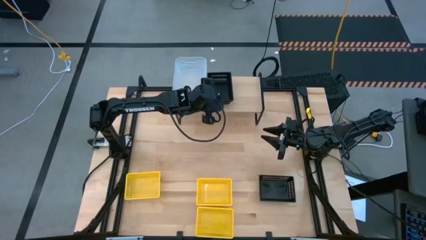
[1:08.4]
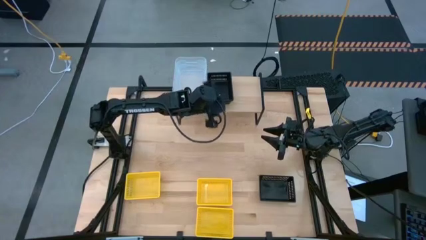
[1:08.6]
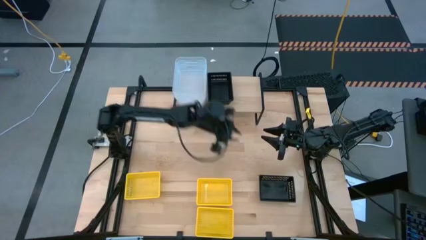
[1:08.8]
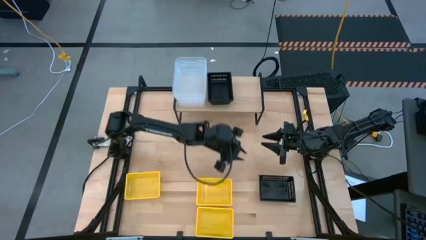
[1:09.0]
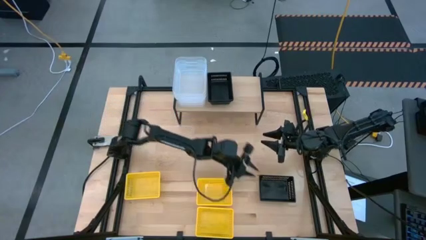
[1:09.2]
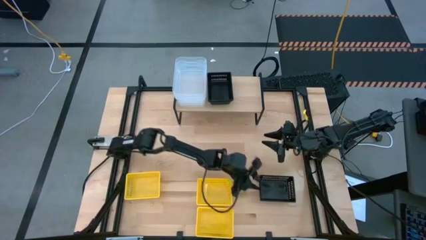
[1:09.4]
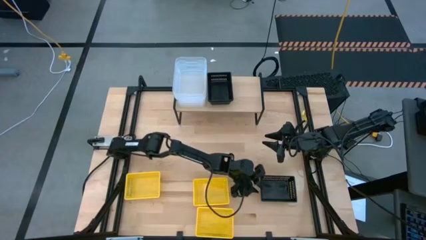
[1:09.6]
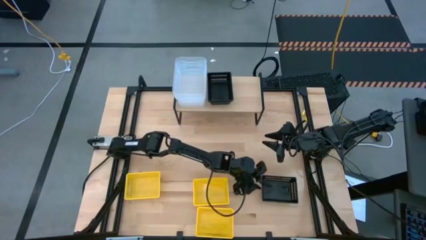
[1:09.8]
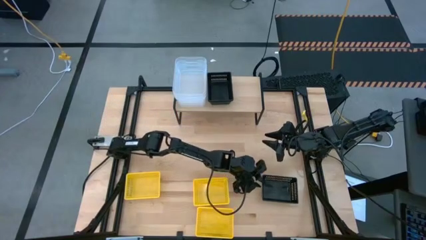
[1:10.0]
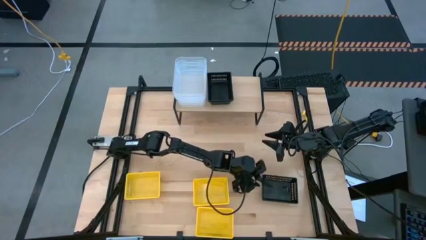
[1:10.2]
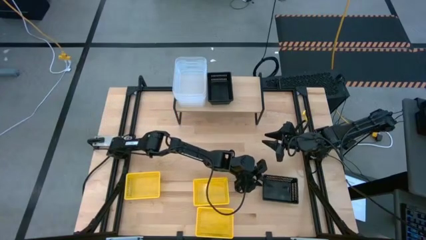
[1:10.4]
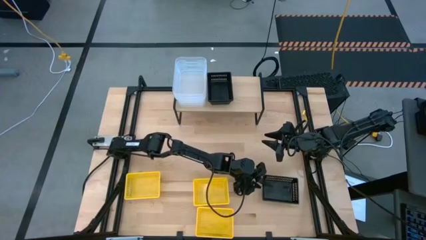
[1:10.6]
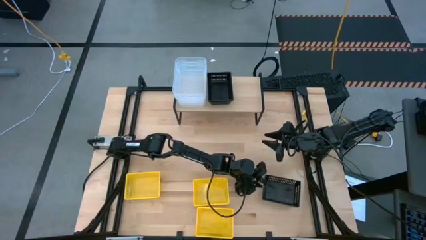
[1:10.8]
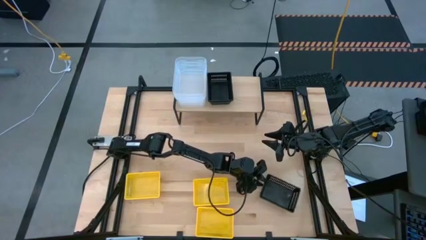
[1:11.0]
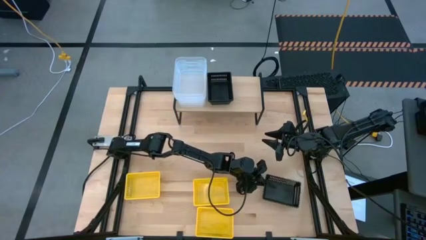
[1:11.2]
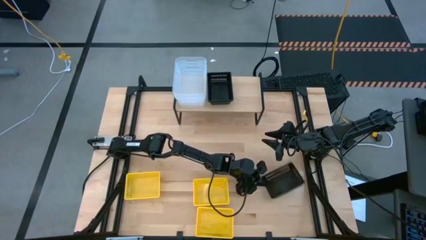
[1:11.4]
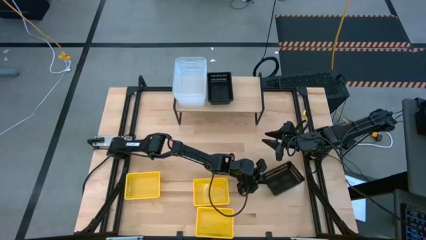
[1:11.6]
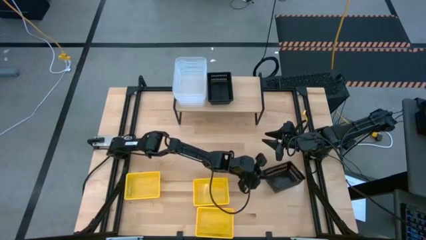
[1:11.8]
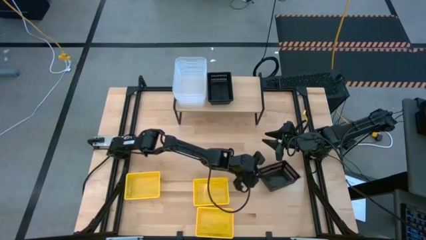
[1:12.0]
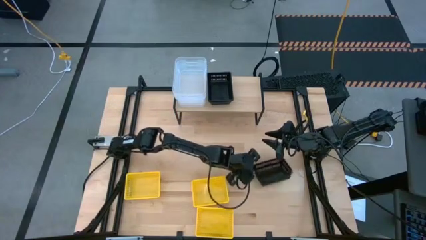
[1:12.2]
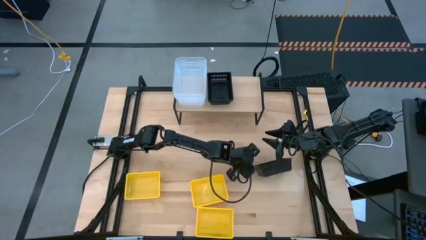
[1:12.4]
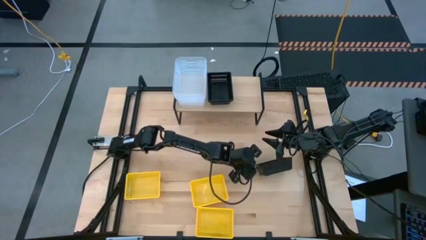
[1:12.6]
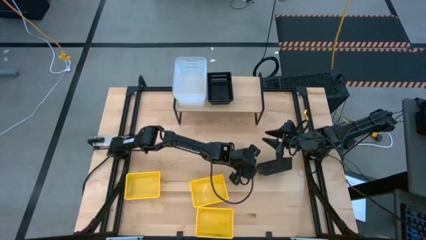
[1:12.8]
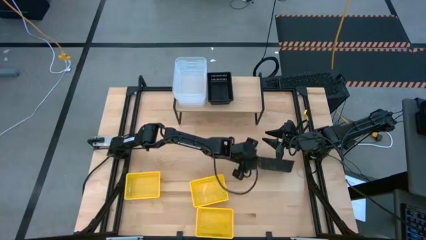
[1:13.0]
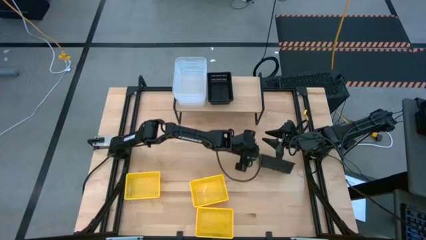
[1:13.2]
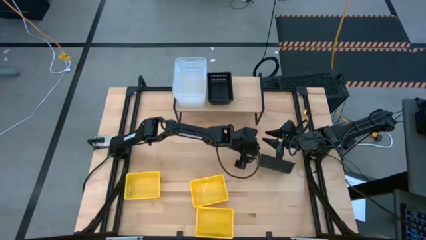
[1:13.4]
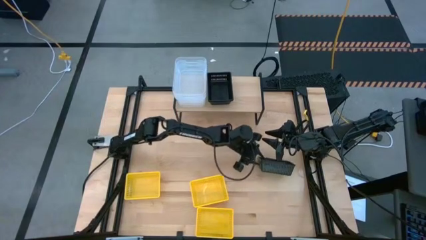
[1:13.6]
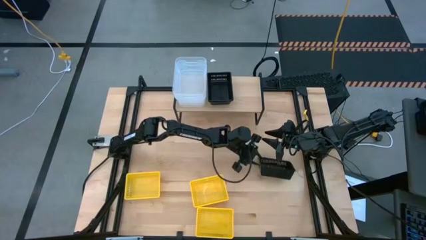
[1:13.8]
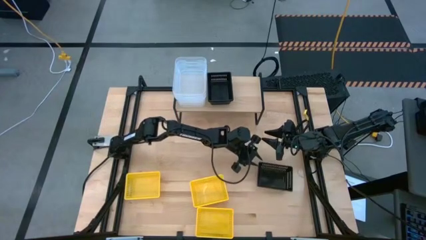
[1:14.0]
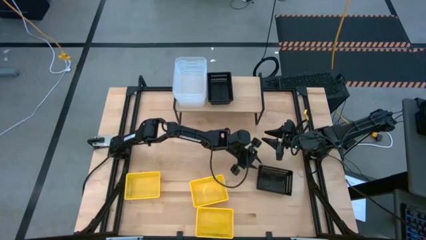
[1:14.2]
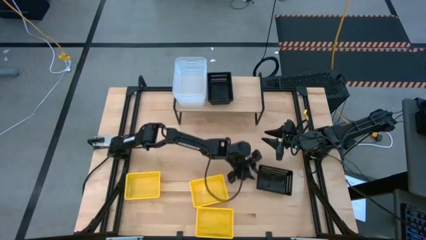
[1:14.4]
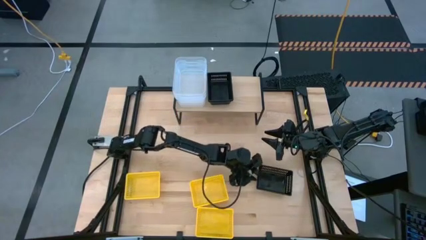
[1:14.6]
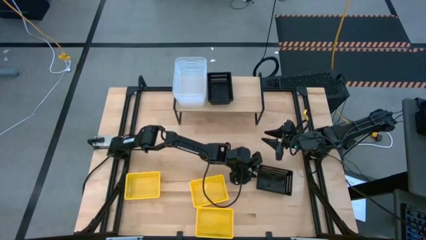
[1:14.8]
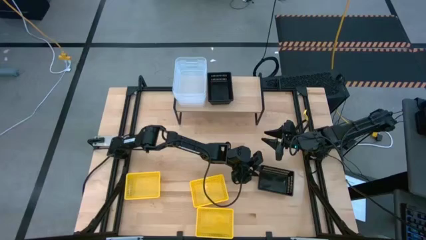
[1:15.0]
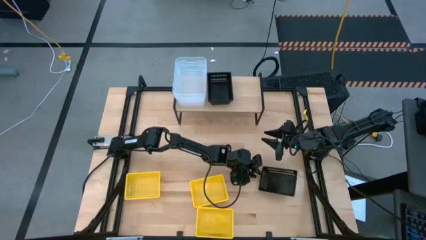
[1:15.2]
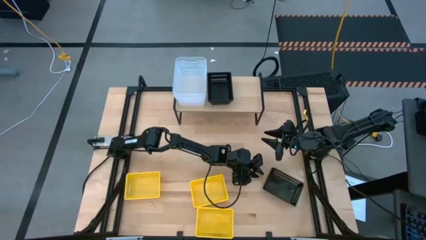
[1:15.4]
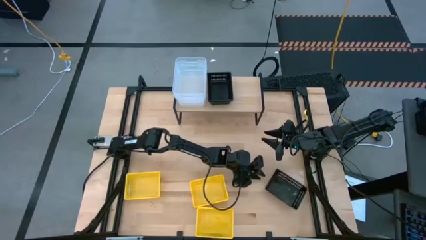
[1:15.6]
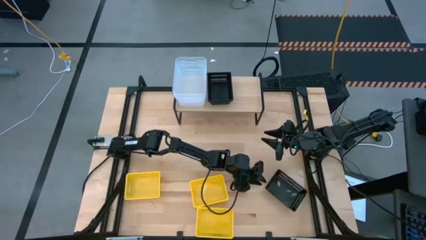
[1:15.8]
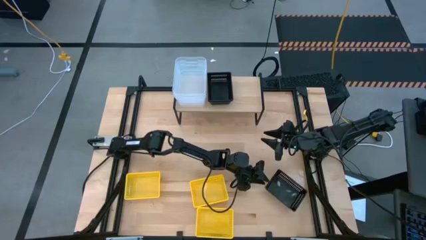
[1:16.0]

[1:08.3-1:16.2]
Task: Stack baskets on shelf by color
Stack the black bin on top of the black bin on the shelf

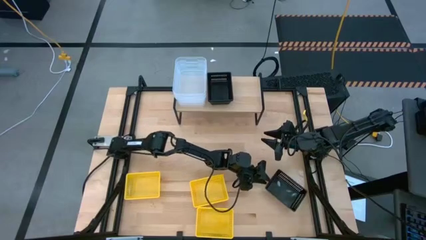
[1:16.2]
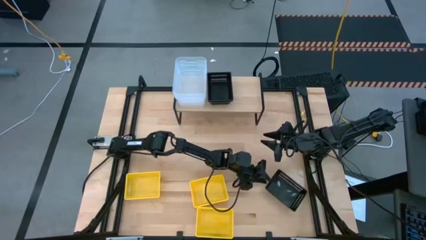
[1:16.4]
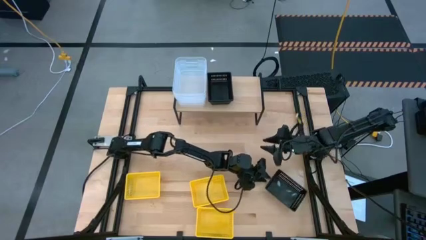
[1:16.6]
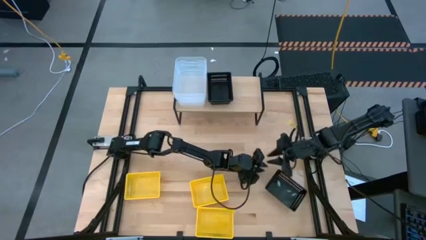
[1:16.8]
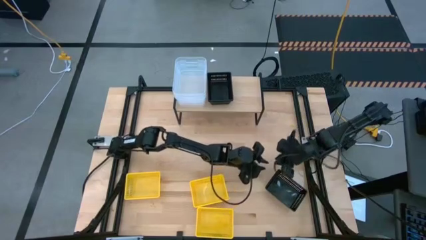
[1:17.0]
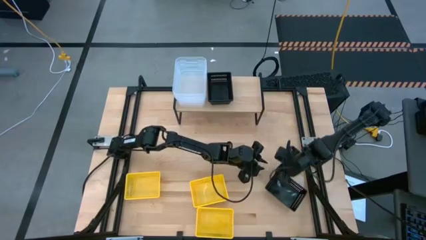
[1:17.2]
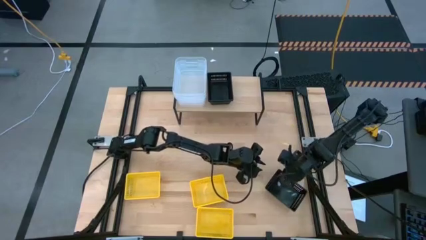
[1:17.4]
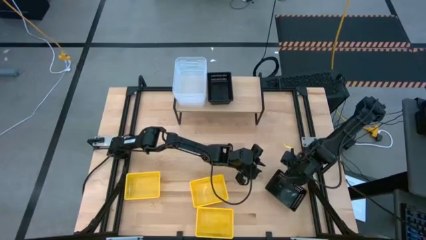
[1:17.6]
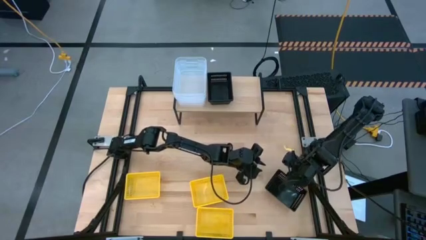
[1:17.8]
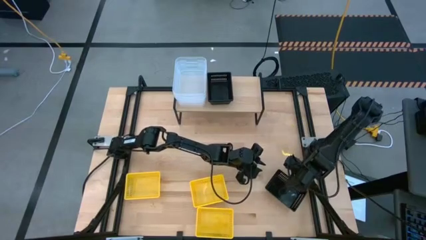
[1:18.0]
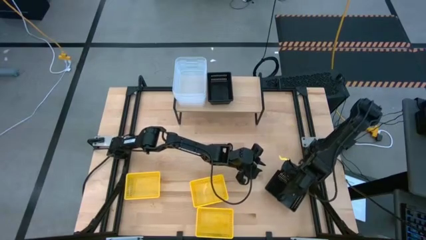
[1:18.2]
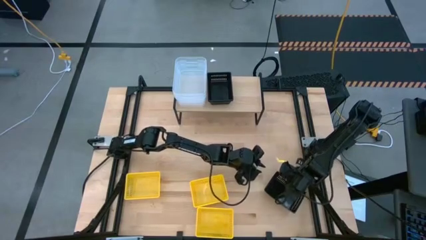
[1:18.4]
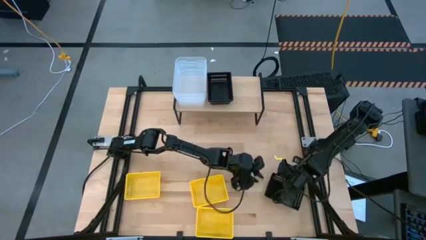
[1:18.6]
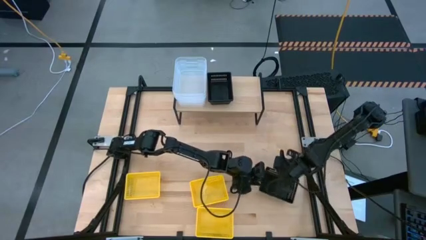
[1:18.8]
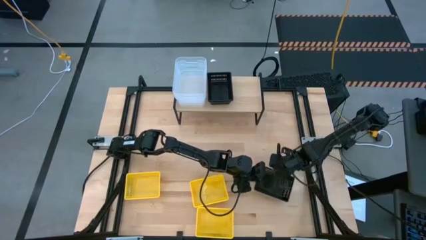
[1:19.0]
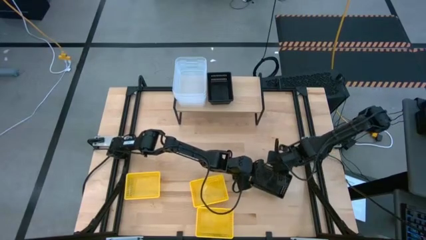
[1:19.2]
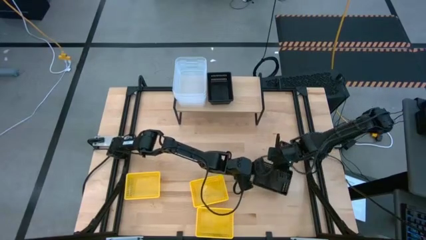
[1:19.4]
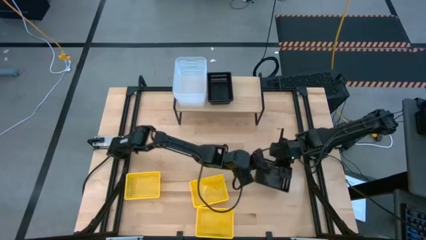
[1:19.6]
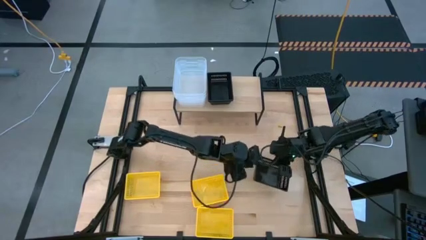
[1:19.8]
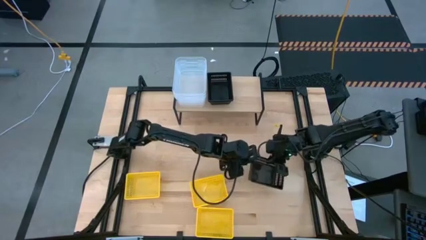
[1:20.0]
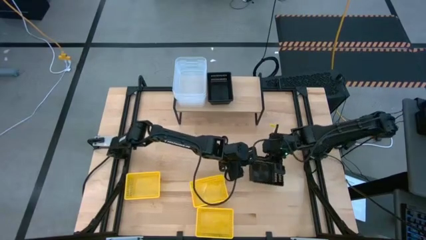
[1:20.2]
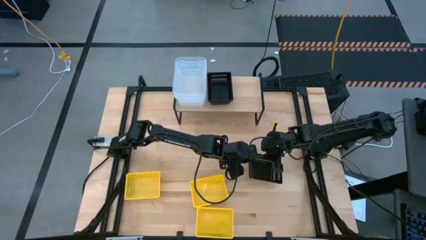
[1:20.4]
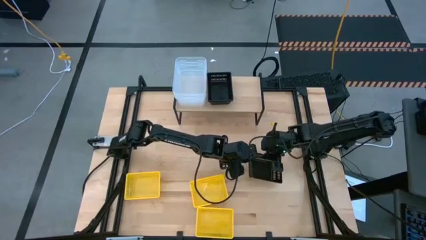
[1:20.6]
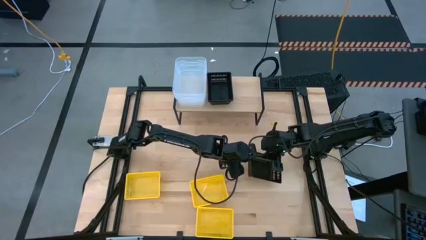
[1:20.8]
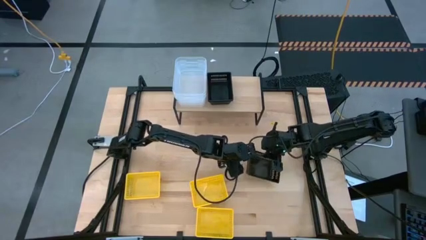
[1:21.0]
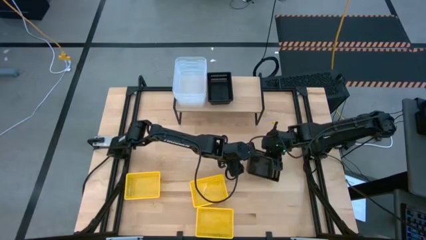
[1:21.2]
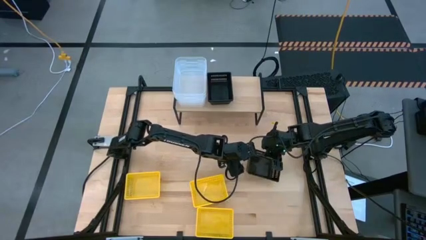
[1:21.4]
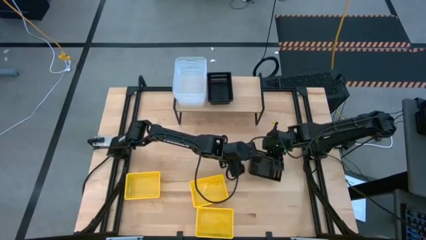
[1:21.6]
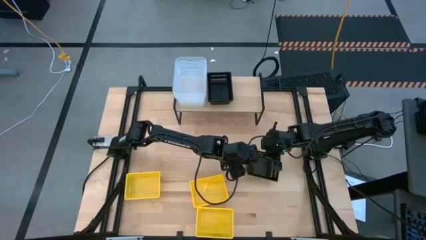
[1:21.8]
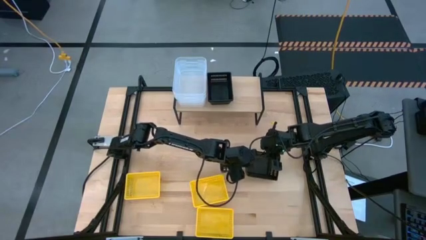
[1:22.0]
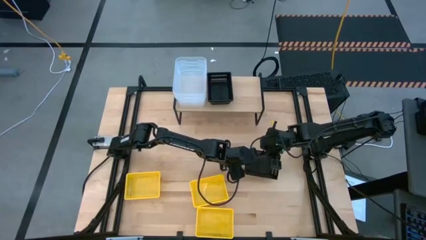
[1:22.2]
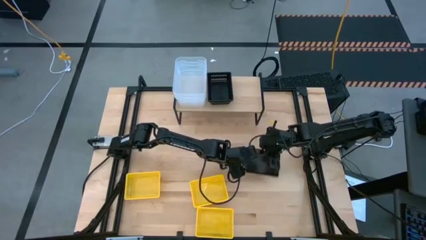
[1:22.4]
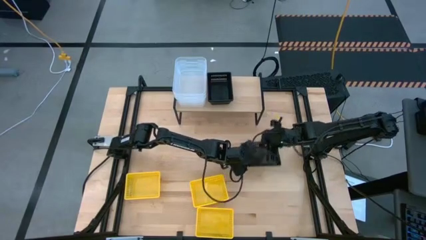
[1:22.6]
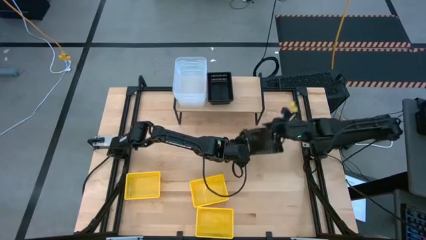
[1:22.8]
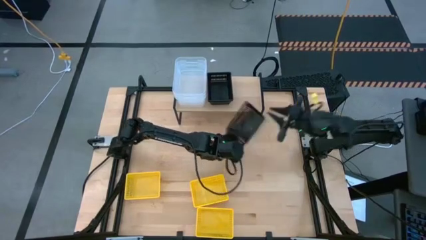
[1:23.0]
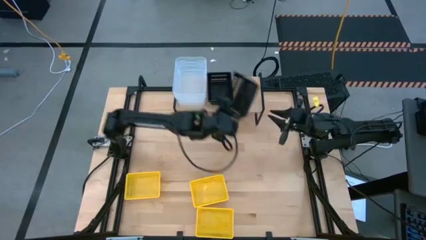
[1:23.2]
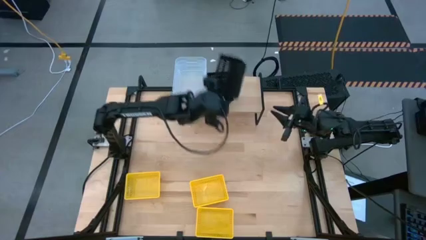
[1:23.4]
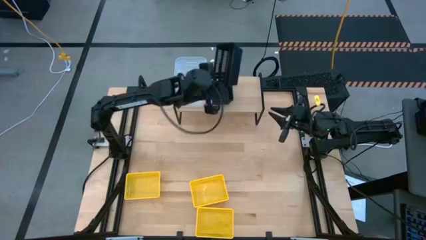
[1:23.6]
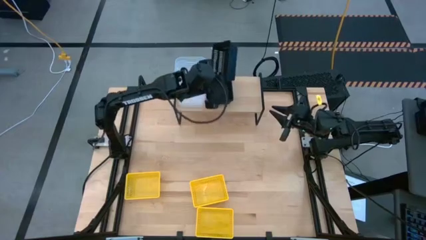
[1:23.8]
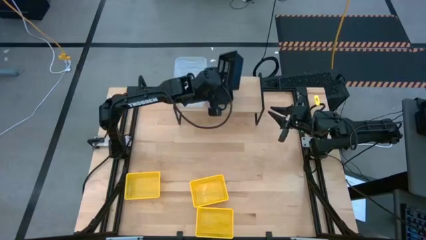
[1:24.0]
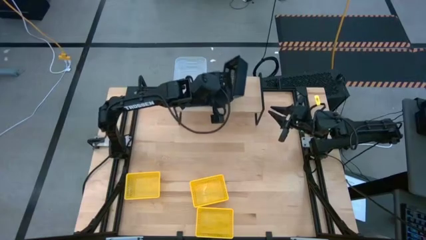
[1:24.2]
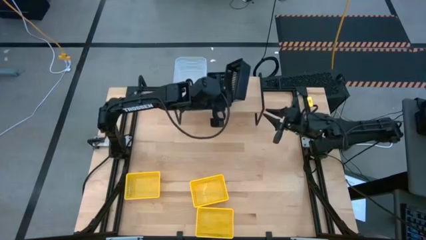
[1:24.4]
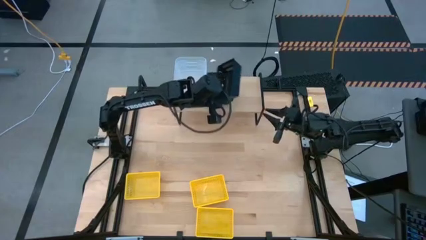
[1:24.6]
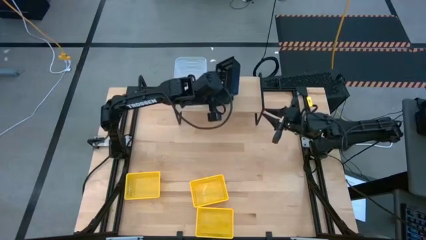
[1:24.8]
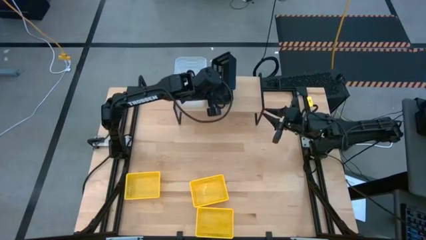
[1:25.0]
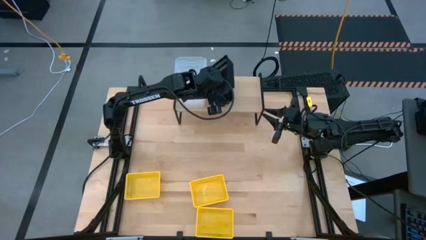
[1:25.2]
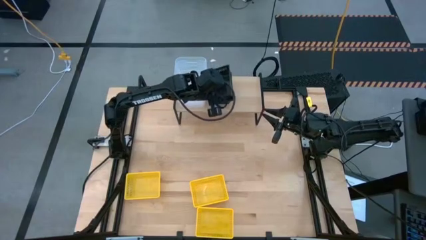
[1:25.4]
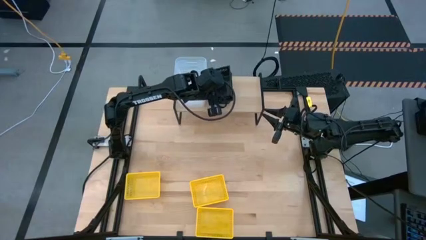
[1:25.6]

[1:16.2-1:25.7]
Stack the black bin on top of the black bin on the shelf
